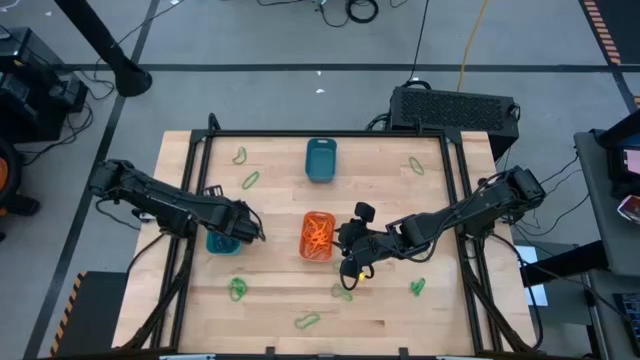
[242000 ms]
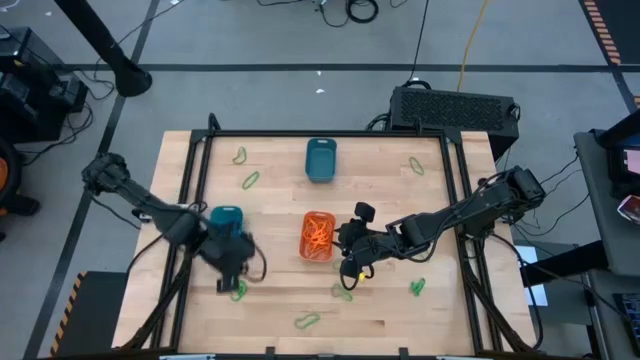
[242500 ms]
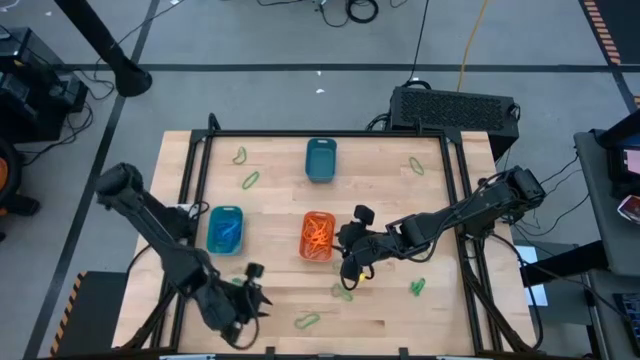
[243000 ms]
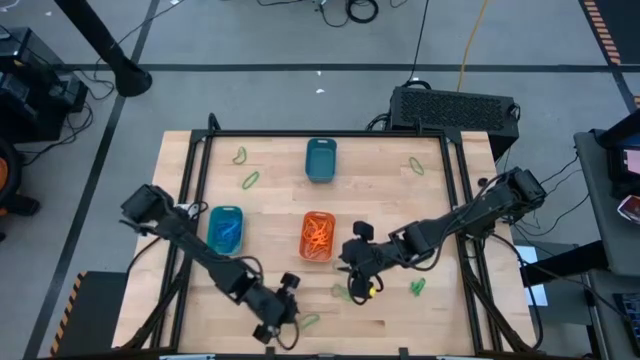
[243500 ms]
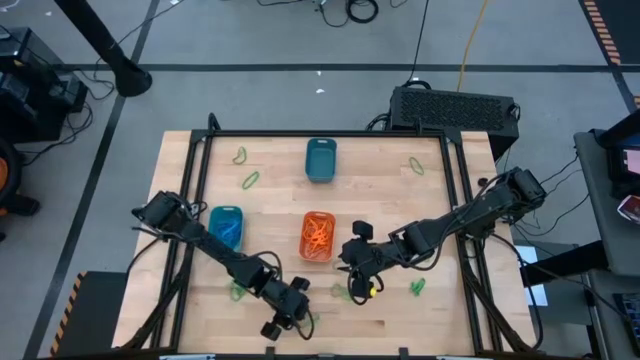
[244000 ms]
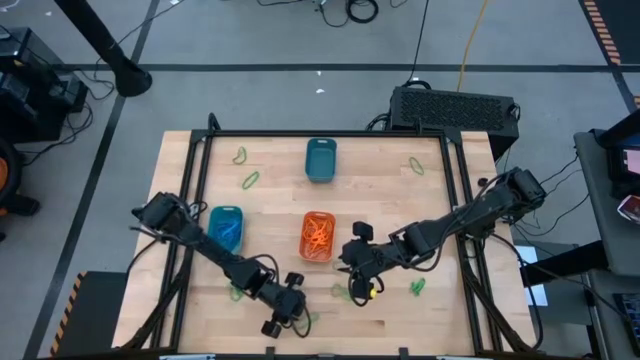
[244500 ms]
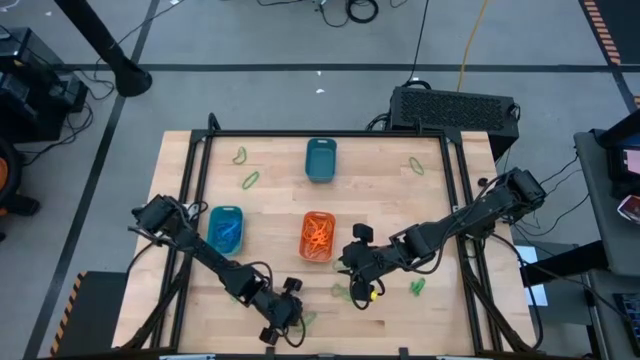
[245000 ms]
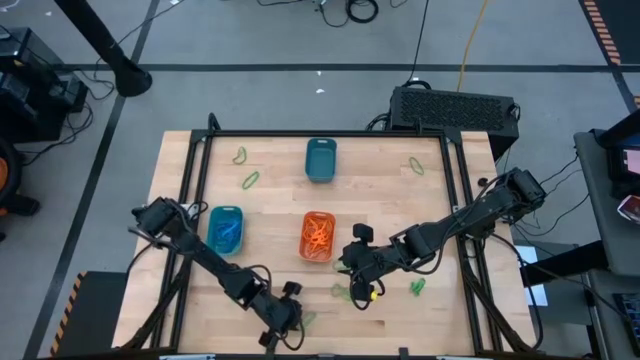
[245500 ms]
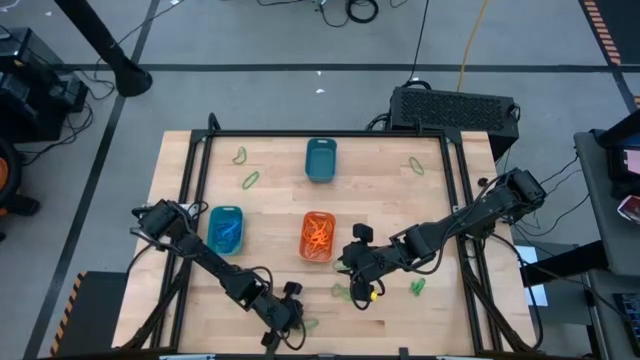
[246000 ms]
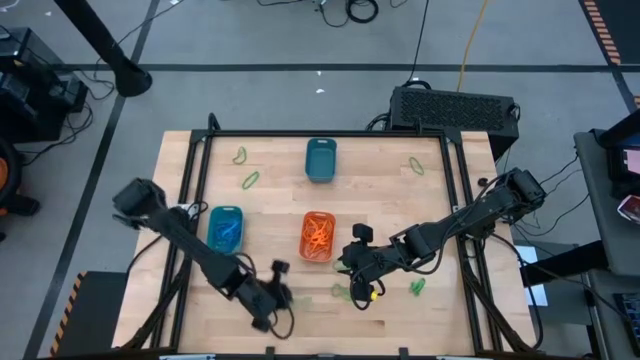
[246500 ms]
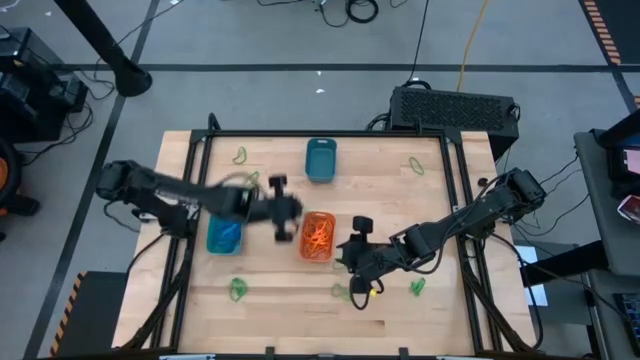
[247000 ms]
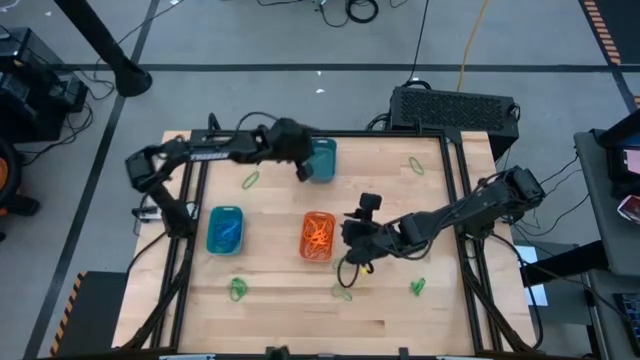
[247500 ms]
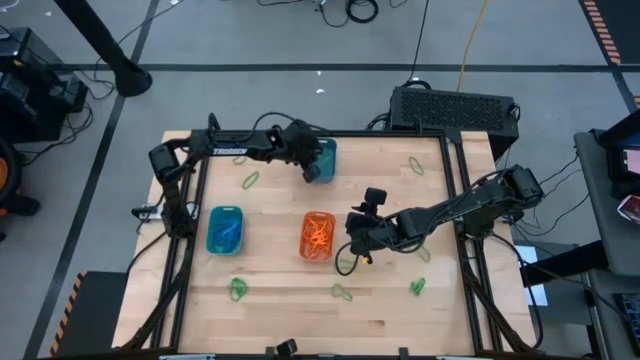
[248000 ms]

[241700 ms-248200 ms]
Task: Sort rubber bands into baskets
Put the green rubber band into the blue bin

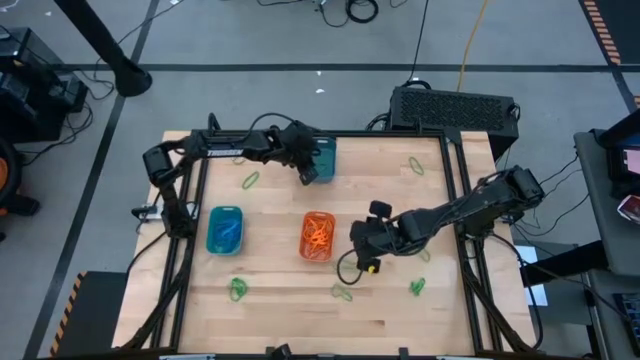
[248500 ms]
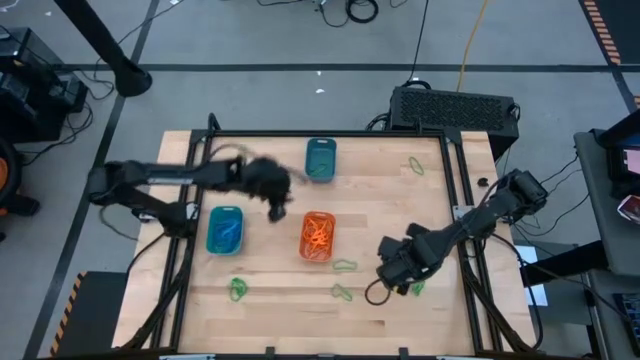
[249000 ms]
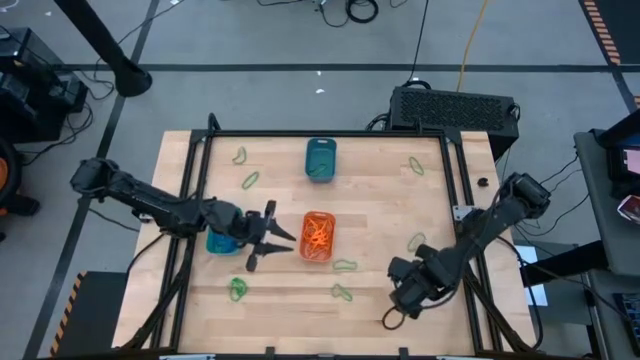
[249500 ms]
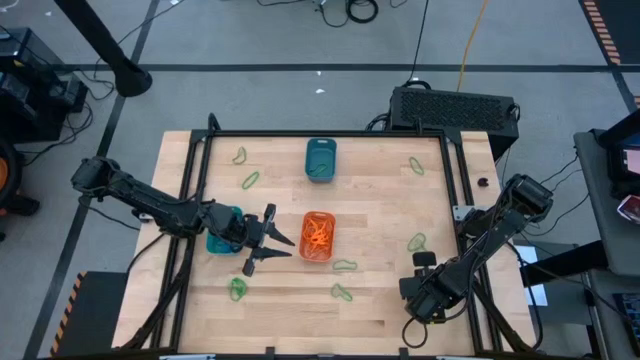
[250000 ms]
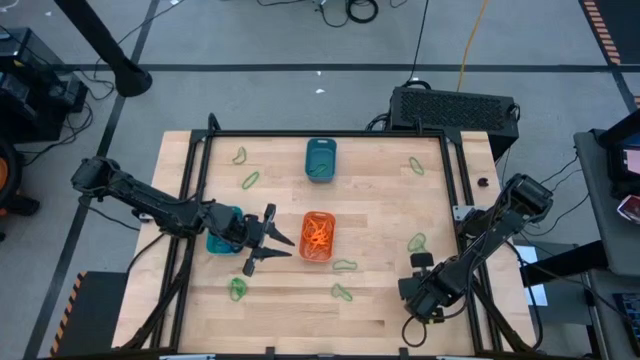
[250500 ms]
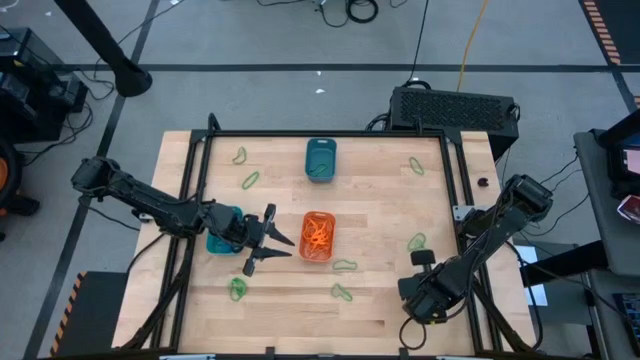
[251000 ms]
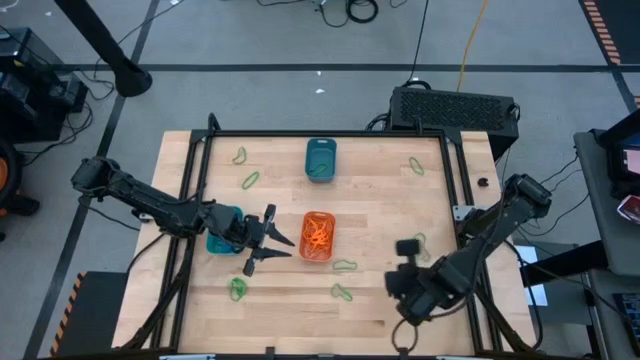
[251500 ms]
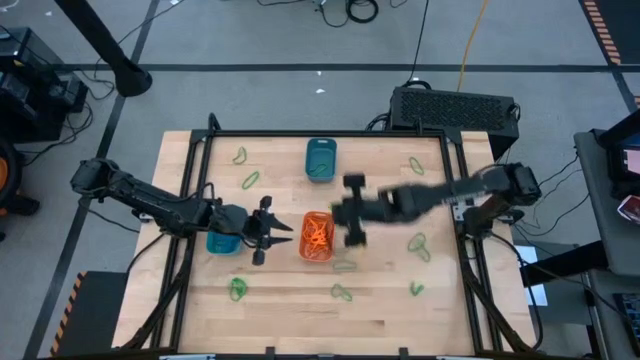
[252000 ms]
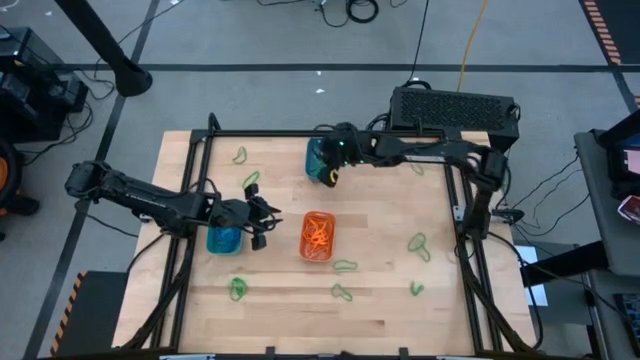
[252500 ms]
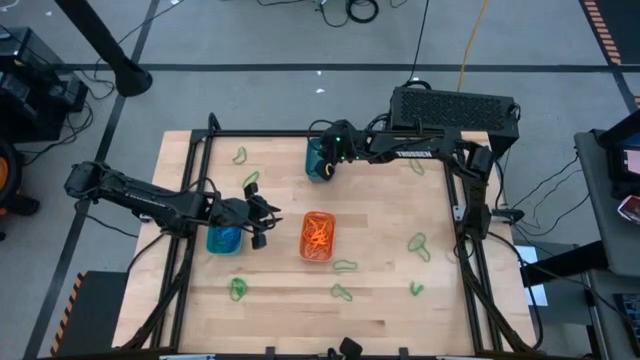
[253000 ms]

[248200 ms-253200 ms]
Put the green rubber band into the blue bin

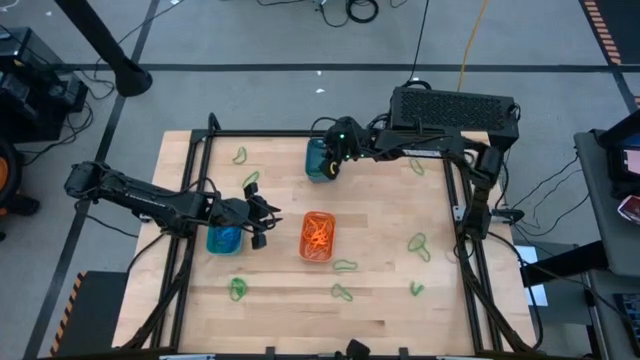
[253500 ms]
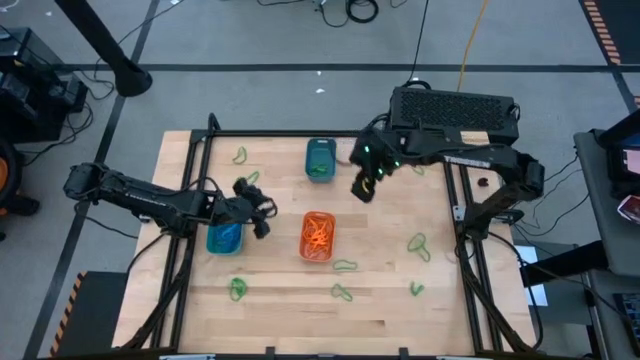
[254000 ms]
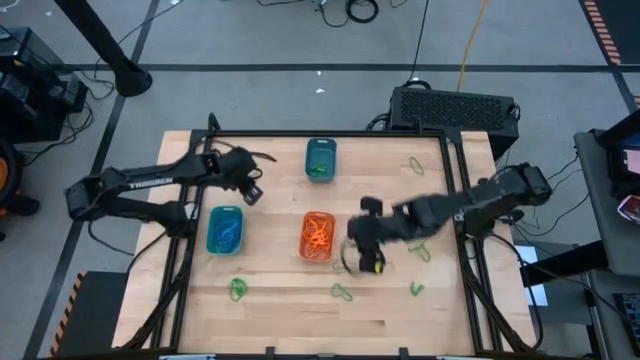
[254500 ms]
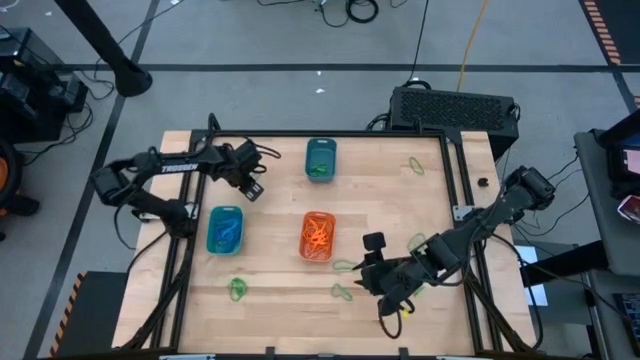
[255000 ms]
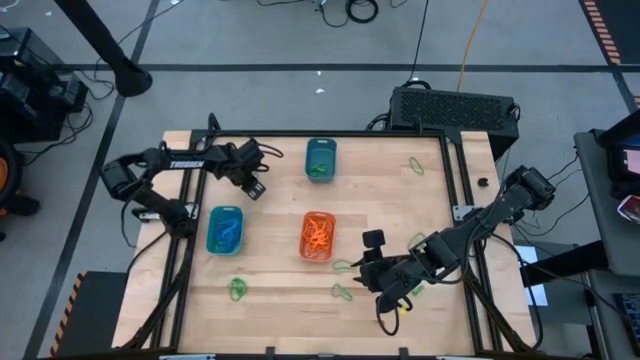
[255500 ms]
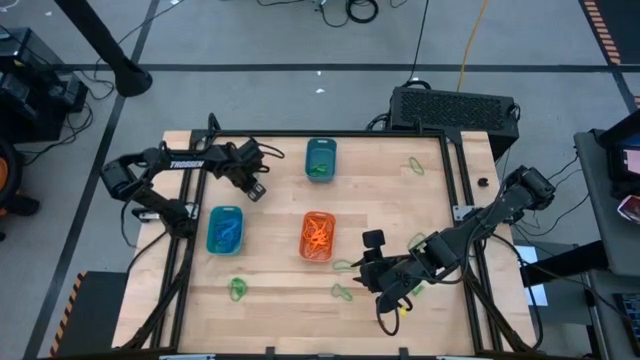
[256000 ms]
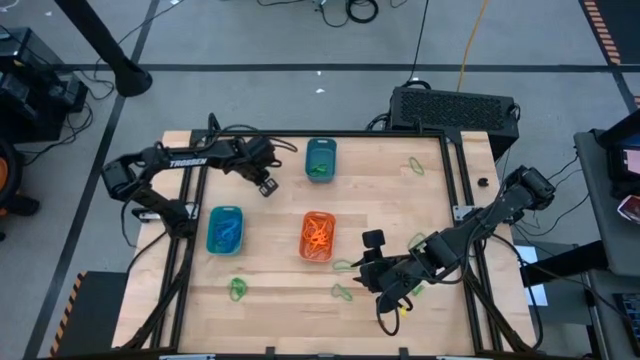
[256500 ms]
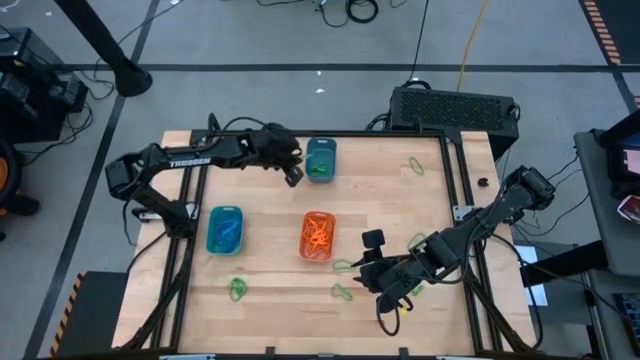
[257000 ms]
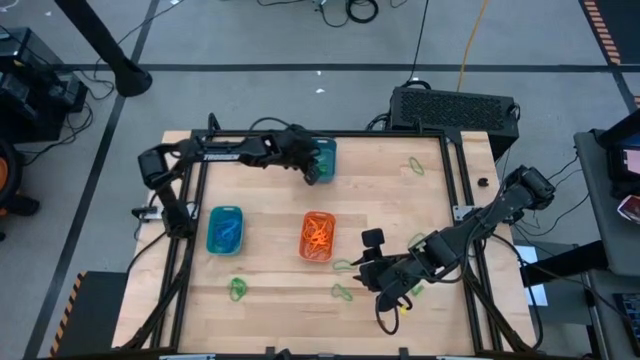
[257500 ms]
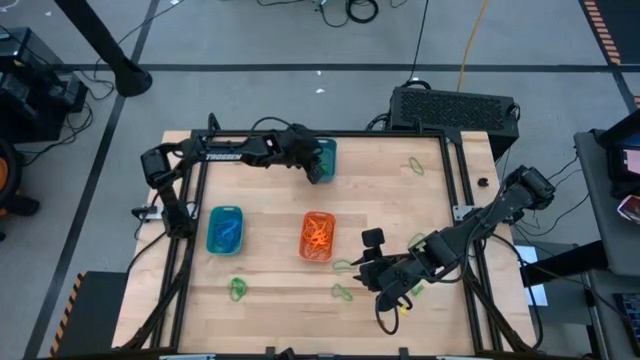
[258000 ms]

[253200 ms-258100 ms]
Put the green rubber band into the blue bin

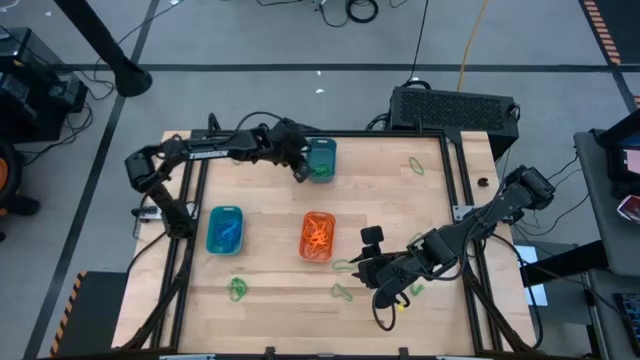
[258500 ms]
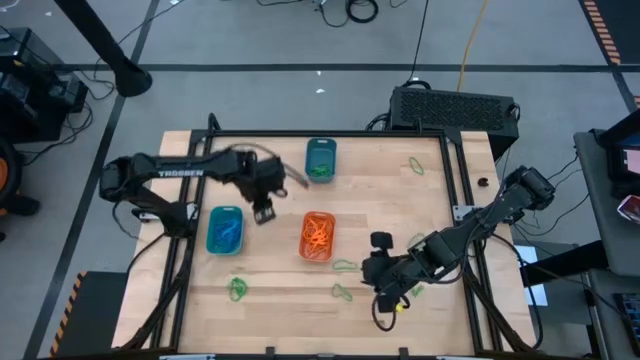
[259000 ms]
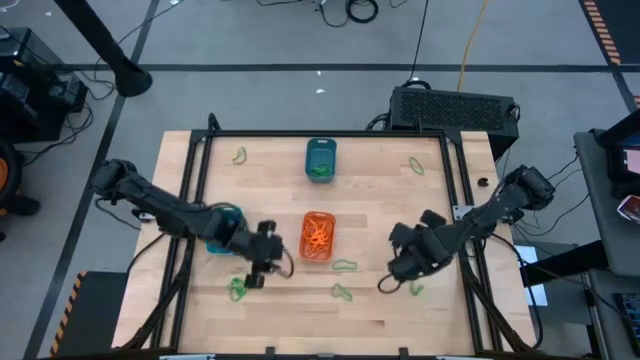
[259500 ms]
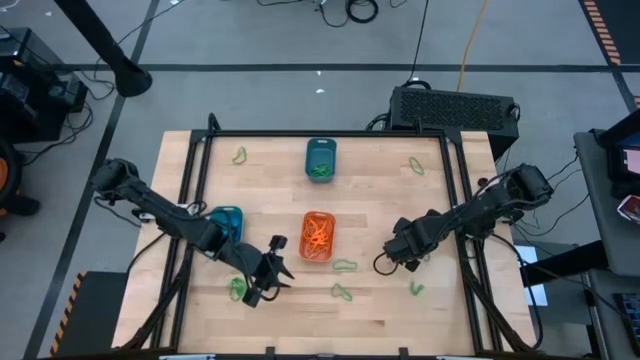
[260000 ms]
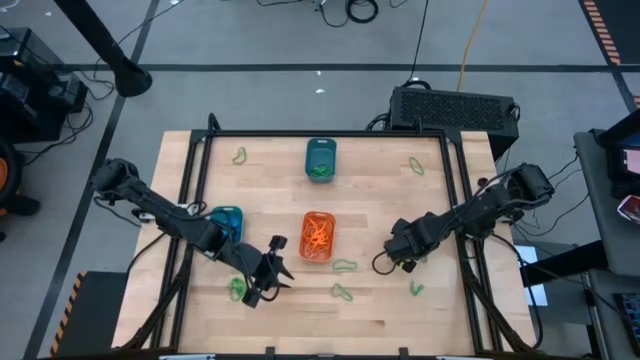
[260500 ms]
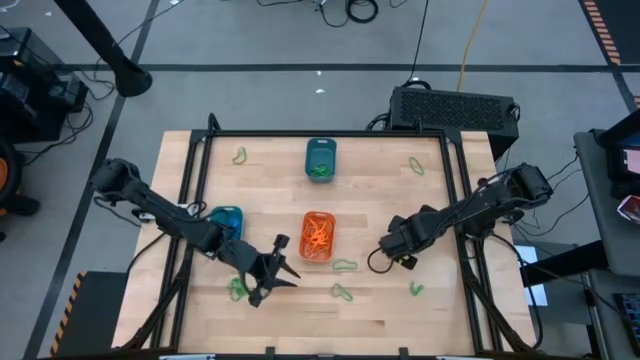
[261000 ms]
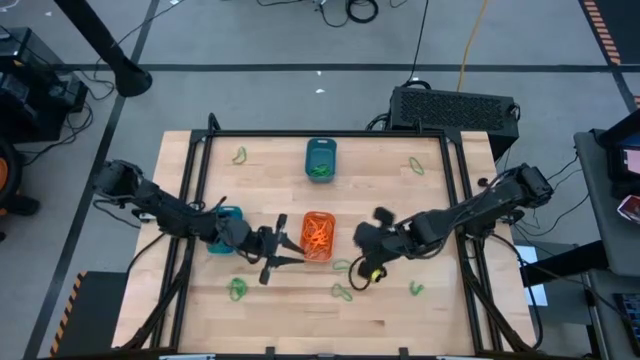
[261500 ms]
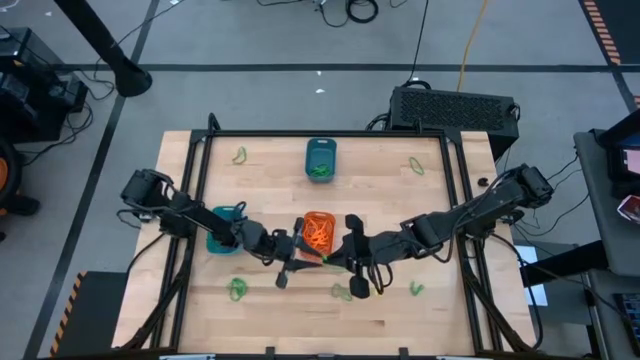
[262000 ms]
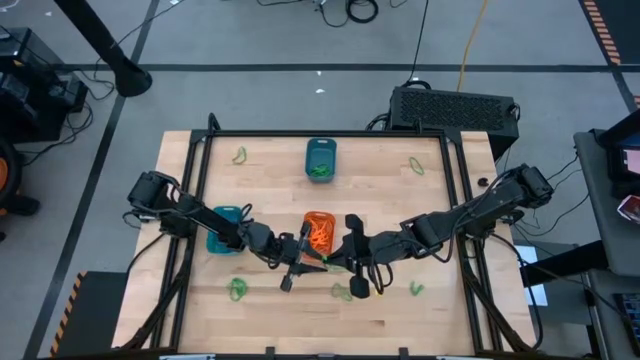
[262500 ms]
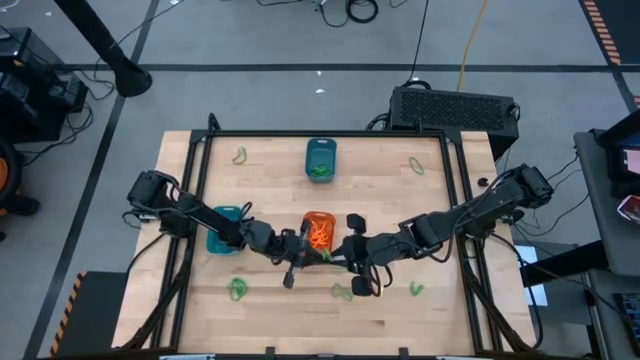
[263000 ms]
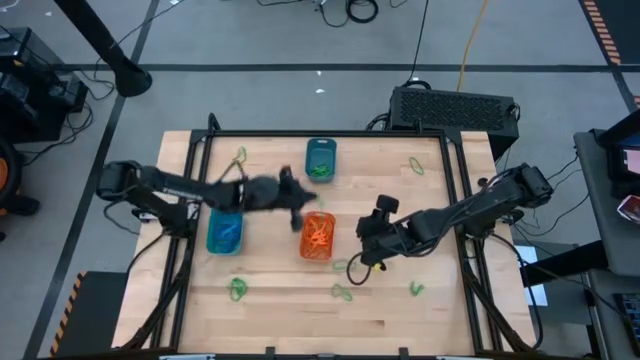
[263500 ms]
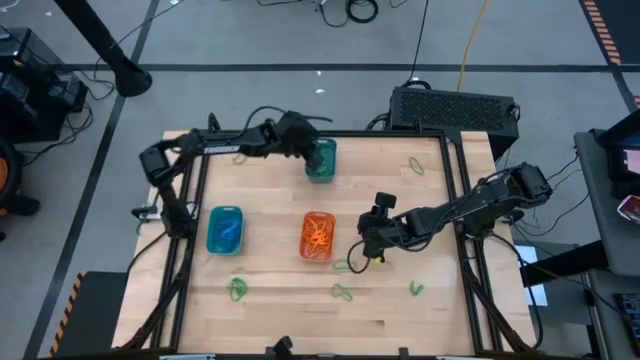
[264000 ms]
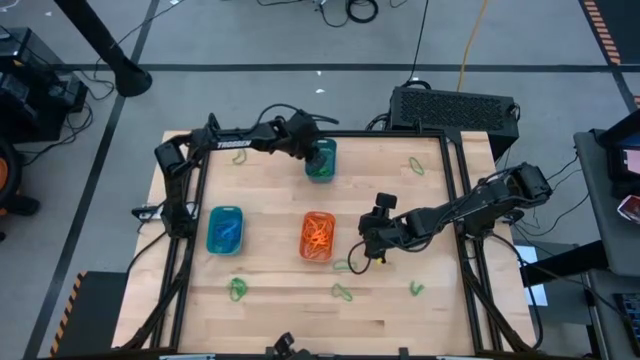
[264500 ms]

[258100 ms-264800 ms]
Put the green rubber band into the blue bin
